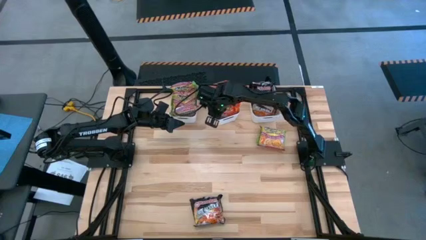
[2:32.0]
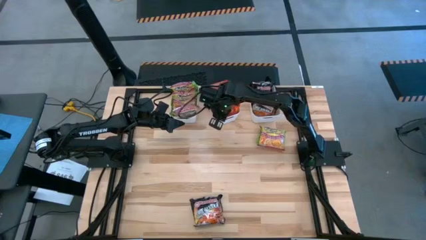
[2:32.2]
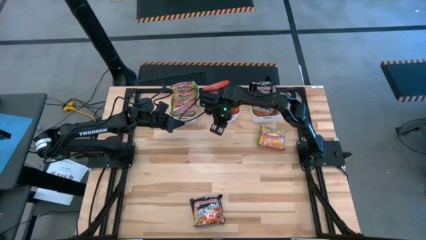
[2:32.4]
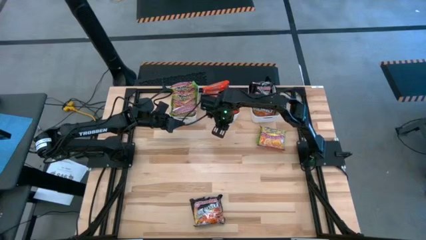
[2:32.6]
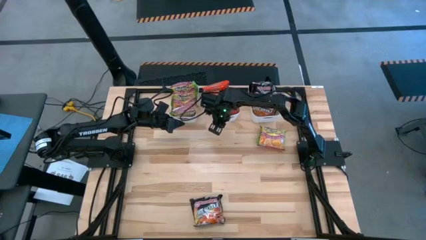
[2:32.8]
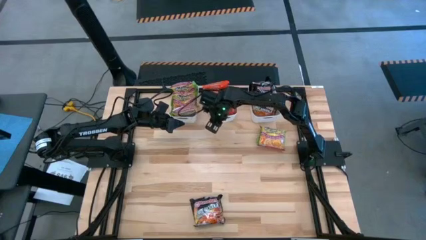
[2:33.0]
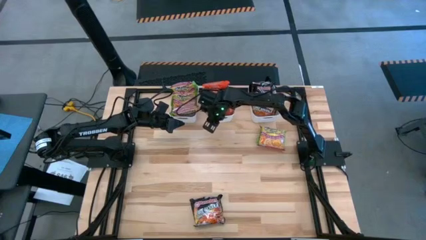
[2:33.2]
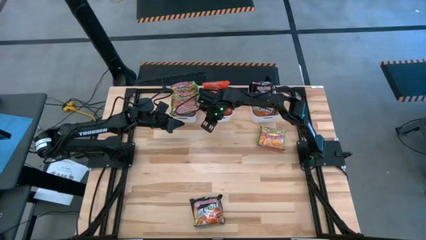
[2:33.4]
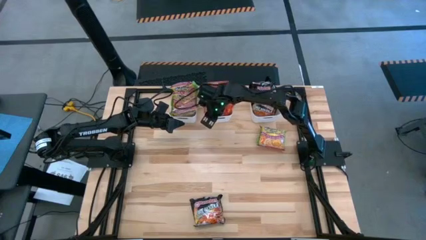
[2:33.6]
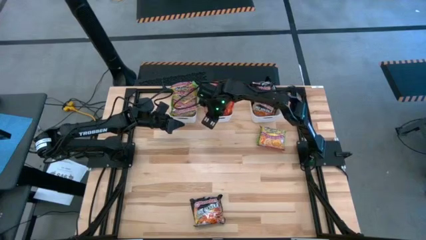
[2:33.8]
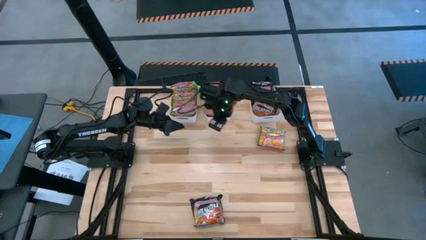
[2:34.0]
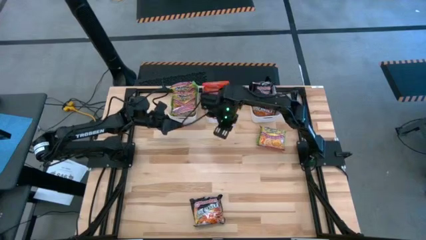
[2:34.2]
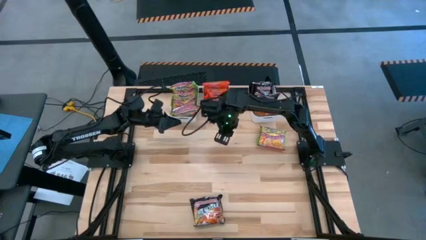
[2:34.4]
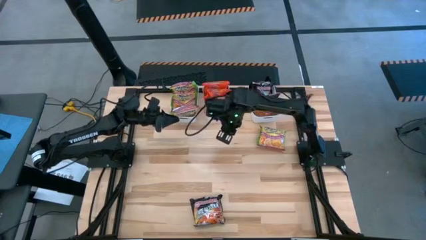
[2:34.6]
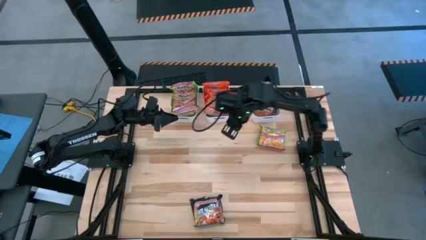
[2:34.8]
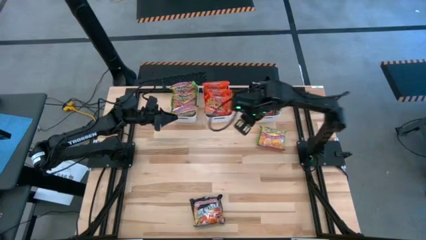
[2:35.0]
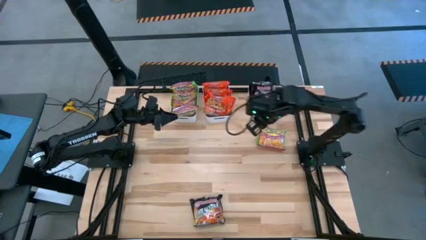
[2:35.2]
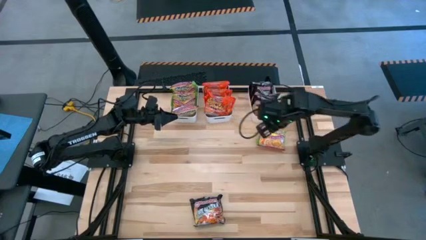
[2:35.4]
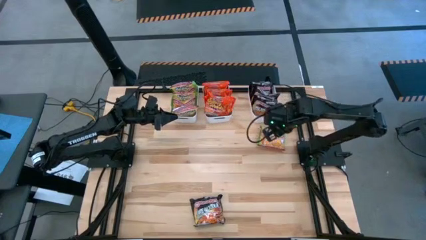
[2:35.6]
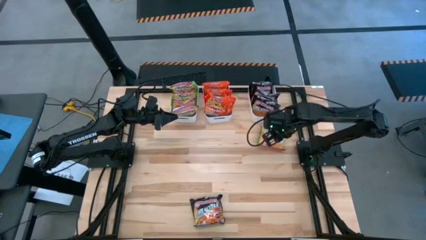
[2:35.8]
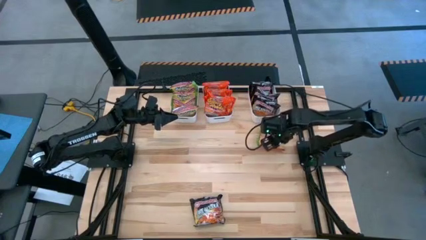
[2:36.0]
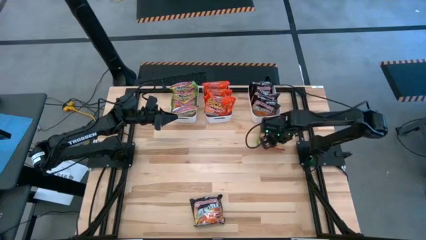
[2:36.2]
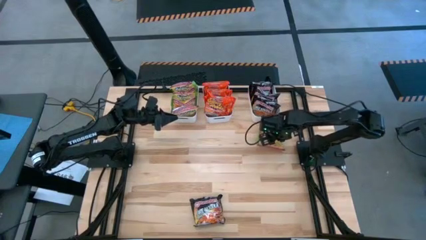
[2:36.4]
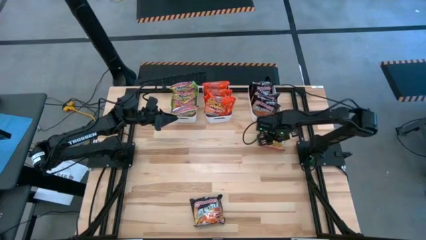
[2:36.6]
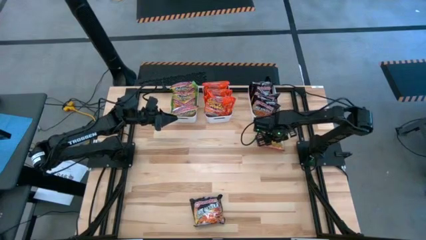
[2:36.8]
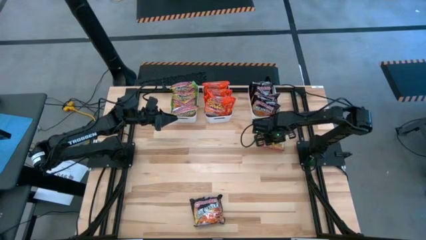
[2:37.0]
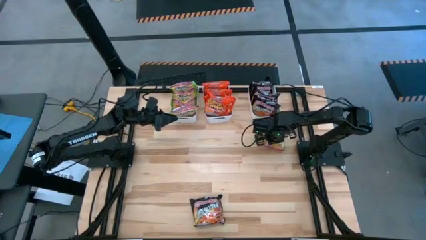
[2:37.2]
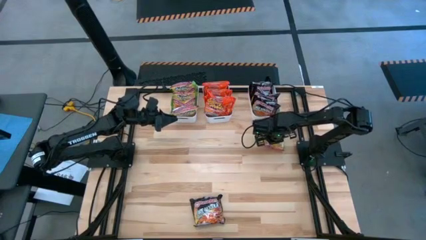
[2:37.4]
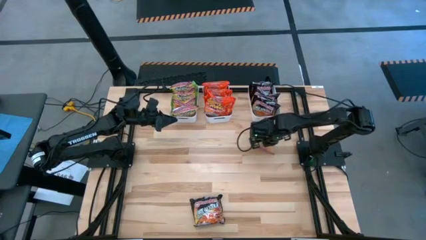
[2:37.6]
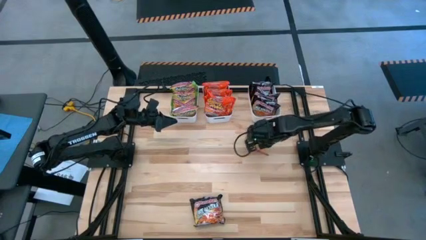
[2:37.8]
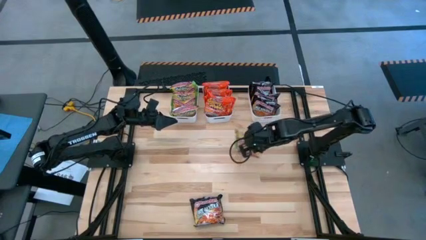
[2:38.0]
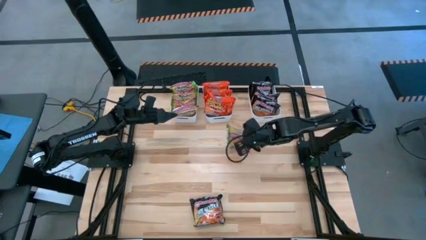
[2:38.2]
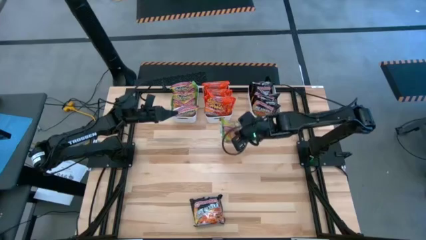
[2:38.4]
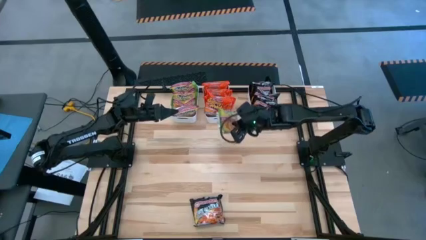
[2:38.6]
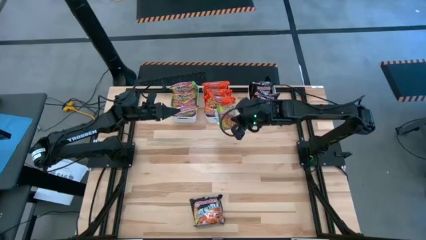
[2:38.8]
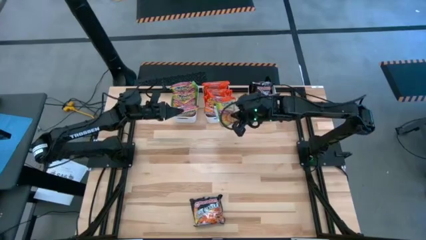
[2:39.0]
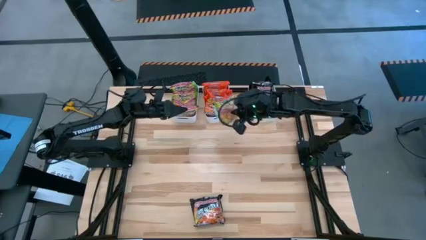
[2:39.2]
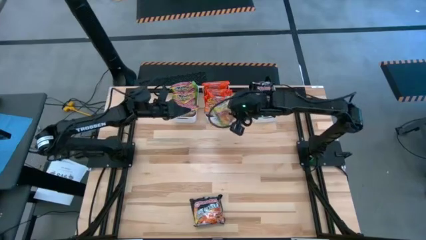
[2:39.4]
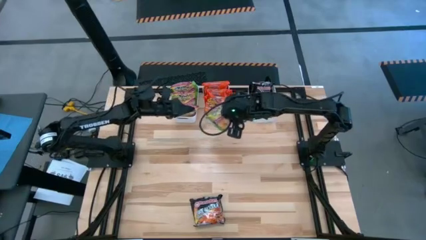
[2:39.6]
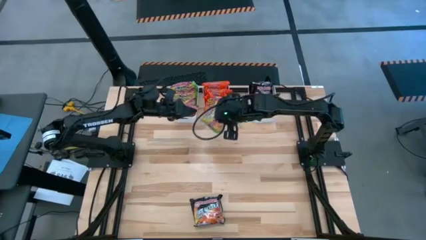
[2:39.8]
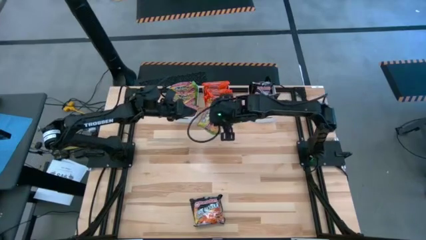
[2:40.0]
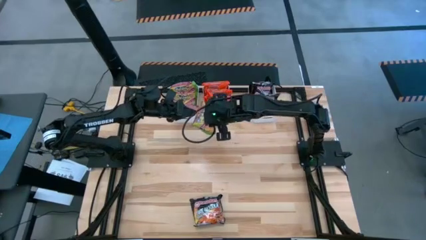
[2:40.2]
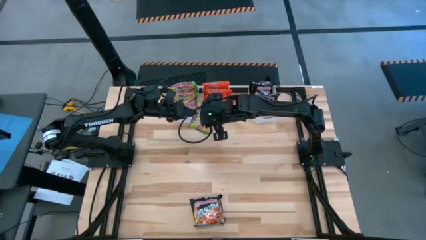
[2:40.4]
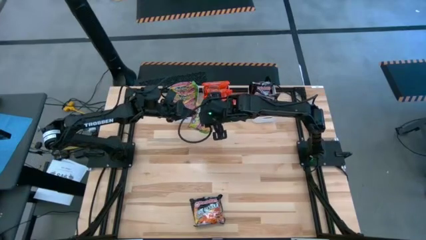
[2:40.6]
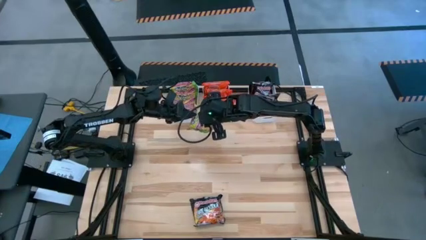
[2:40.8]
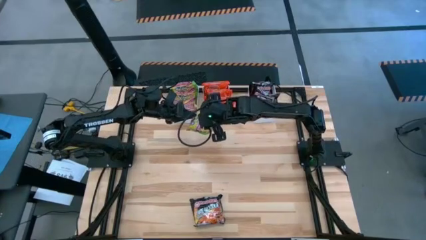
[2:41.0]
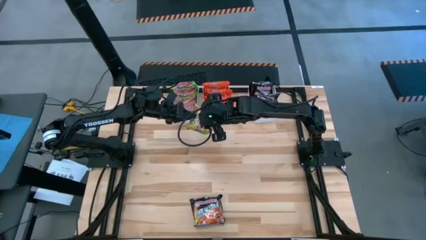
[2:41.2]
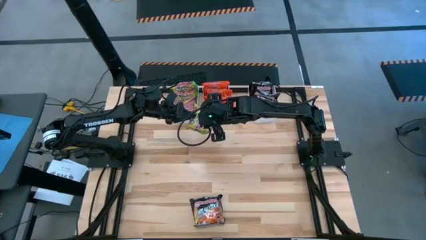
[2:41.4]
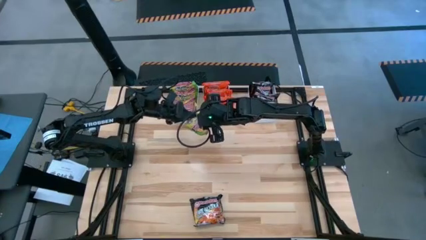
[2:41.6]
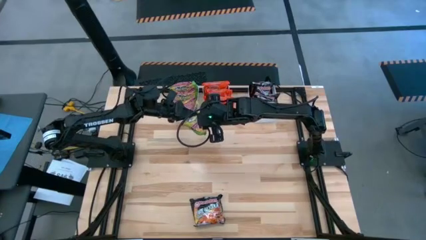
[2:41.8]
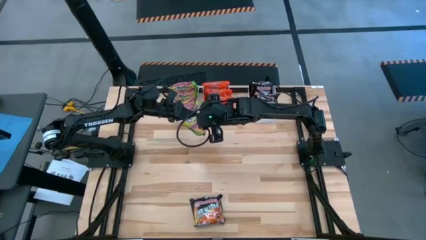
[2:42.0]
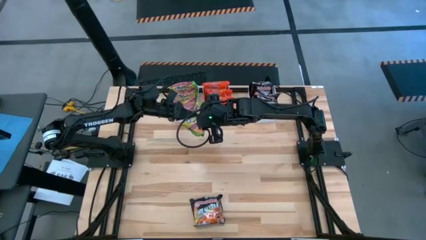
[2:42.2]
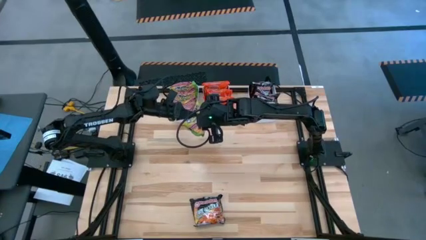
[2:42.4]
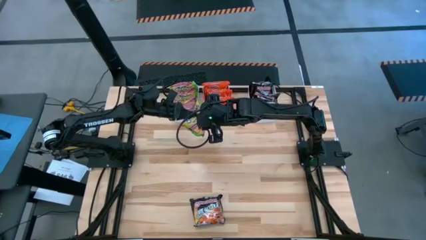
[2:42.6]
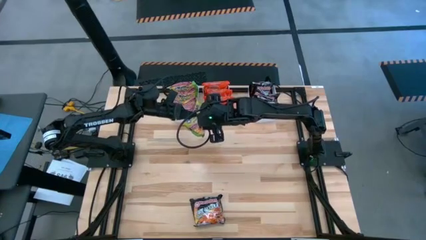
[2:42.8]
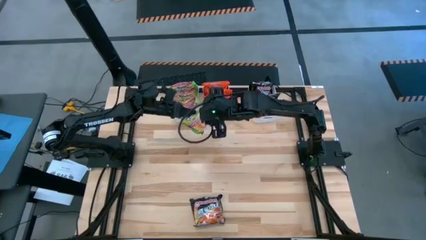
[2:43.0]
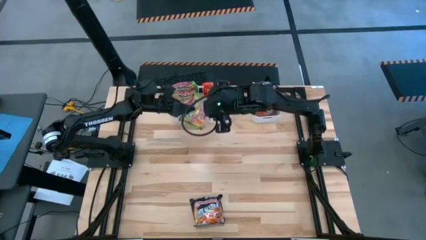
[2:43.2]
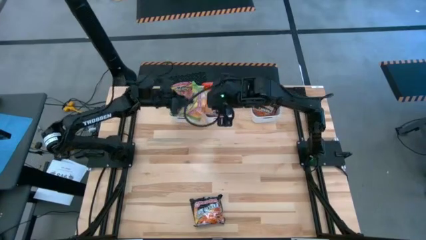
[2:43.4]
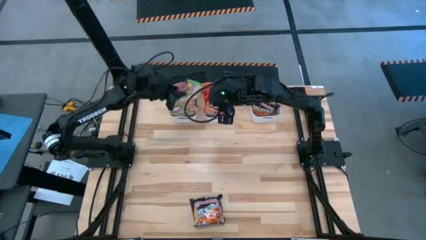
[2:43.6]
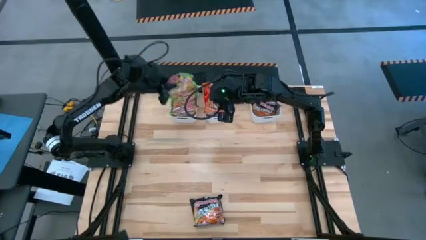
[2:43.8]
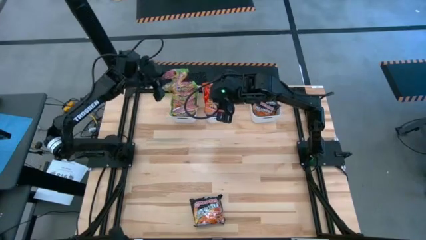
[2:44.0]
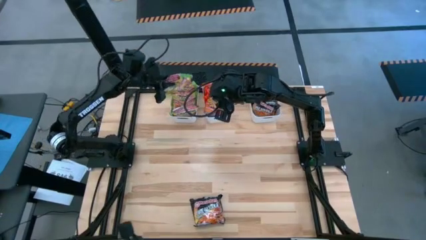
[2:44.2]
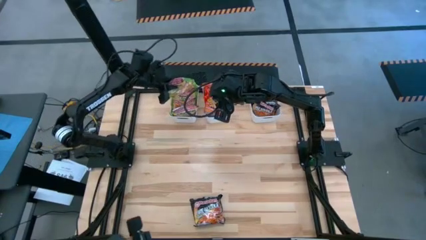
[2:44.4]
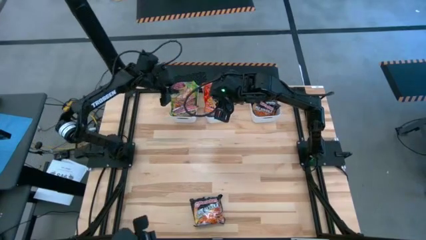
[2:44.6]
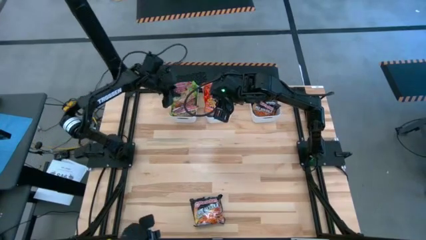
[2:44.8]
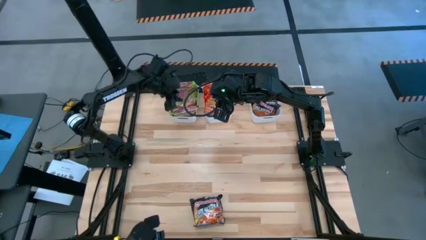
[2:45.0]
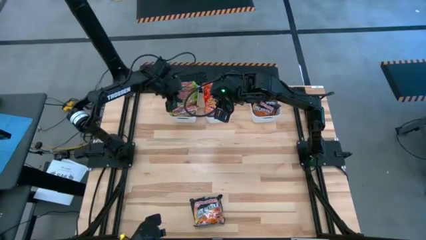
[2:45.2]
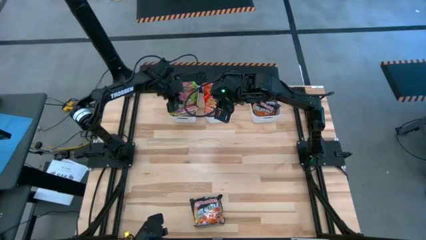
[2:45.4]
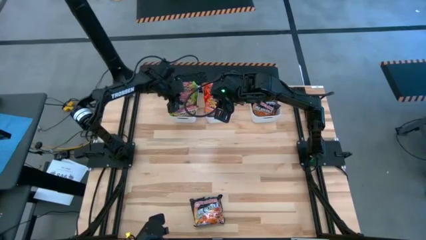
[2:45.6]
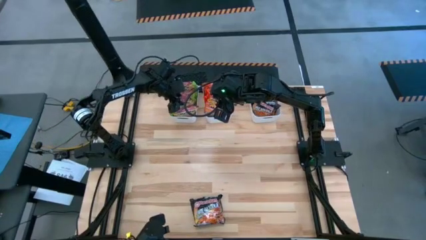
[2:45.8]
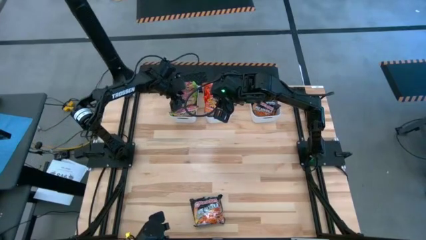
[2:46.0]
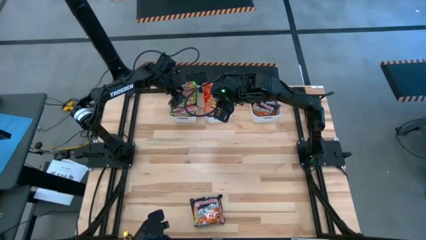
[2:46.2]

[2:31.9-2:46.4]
Task: Sort Maruchan noodles
Put the green noodle pack into the left white bin

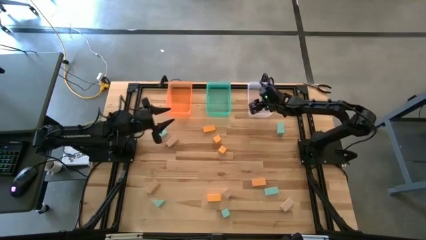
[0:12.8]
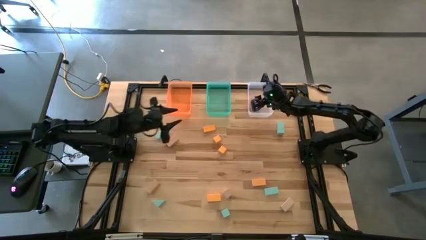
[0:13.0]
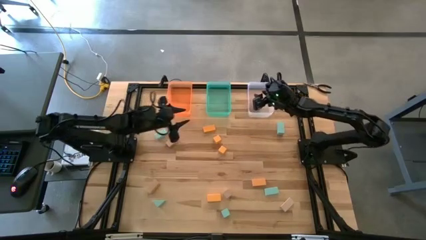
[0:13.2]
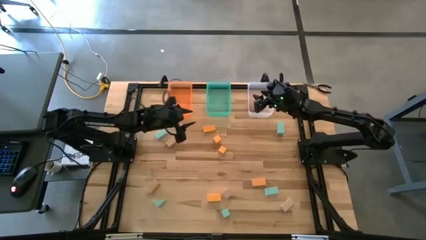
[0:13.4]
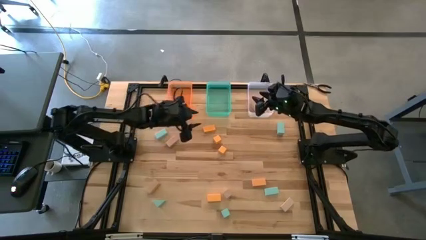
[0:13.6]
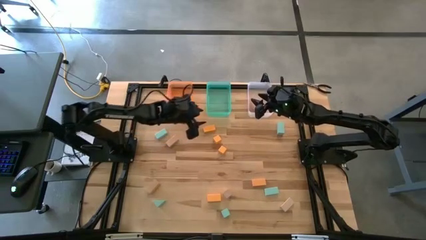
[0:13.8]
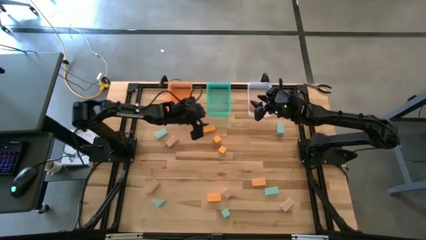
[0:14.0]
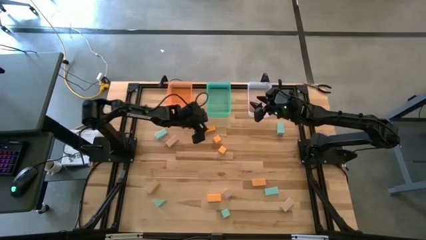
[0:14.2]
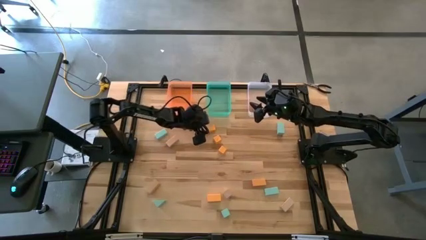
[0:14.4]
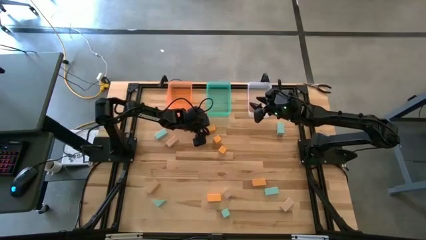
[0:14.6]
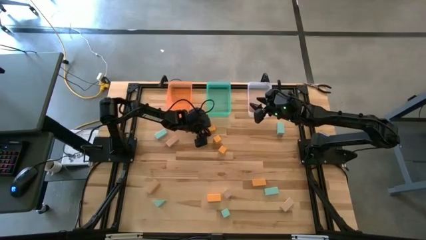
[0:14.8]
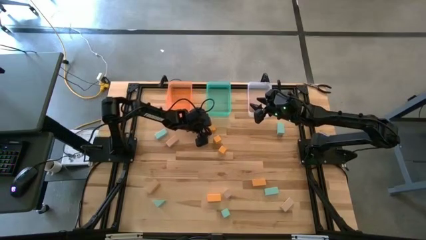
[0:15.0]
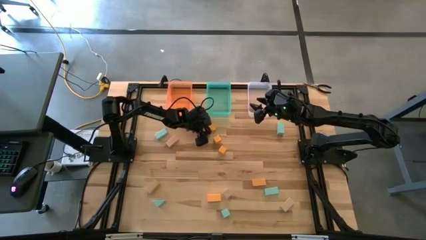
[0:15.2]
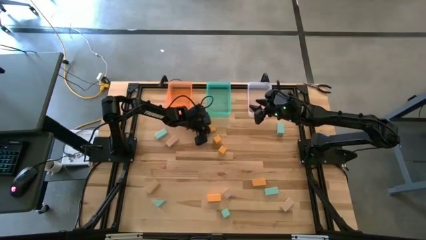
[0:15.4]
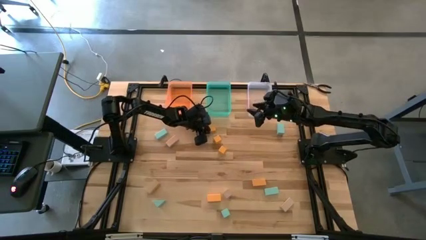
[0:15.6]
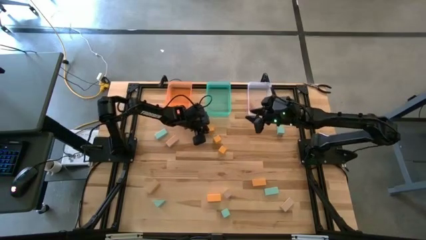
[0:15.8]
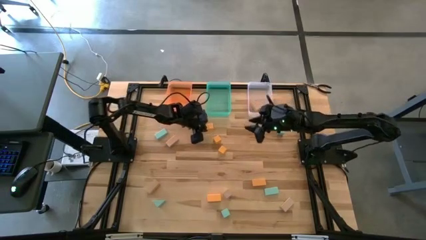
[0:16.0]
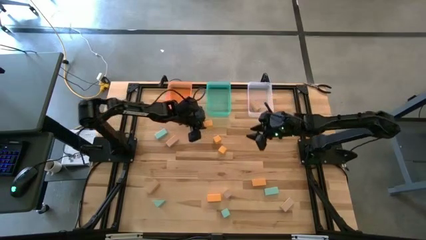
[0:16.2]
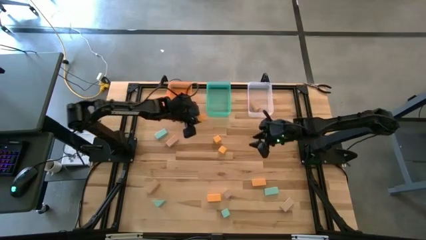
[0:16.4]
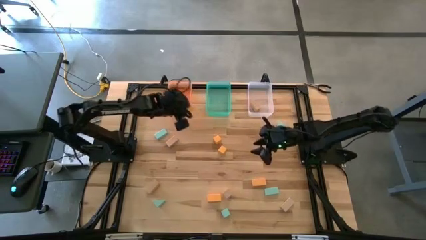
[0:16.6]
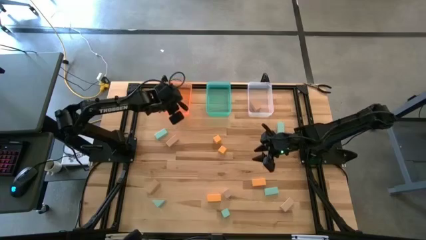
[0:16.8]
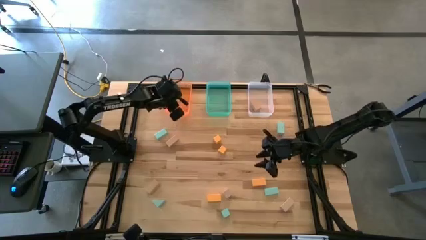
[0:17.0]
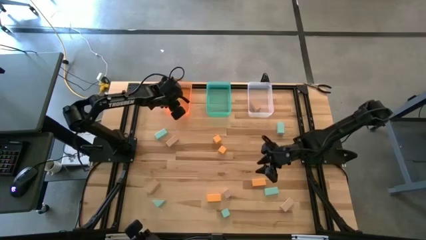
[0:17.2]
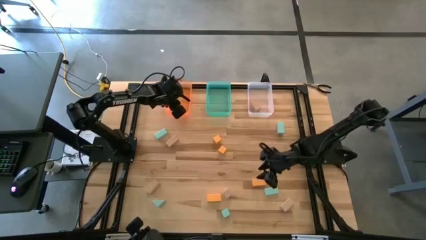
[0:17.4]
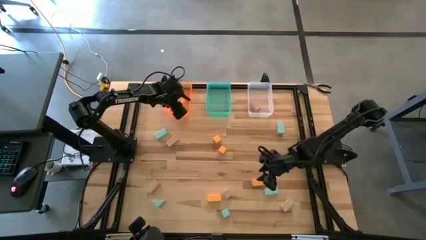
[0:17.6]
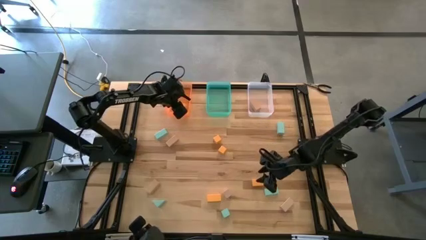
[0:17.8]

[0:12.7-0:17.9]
Task: Sort & place blocks by color
Put the orange block into the orange bin
